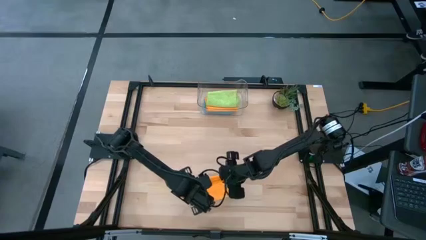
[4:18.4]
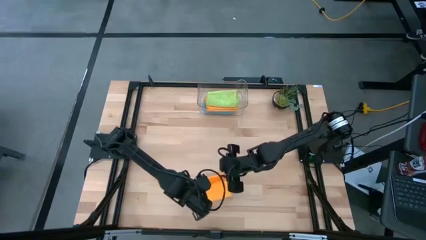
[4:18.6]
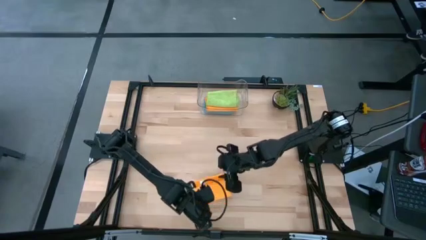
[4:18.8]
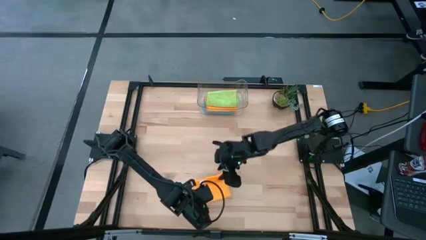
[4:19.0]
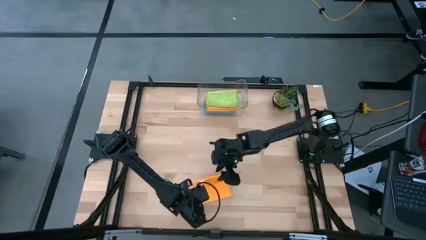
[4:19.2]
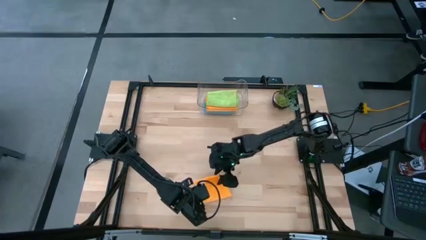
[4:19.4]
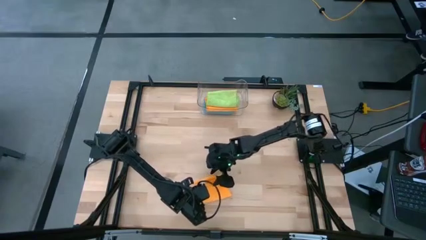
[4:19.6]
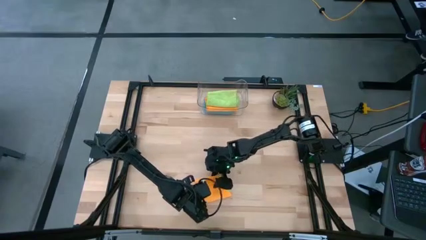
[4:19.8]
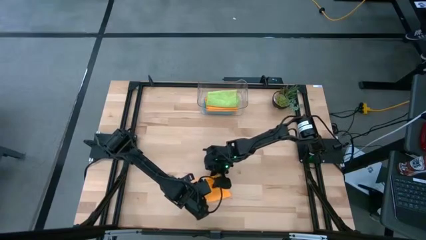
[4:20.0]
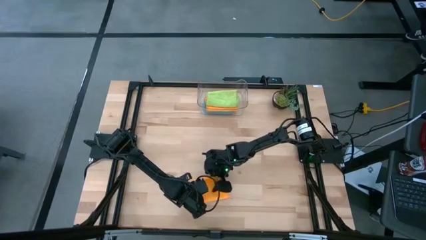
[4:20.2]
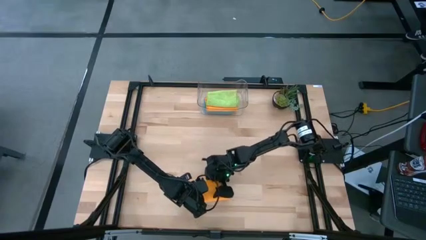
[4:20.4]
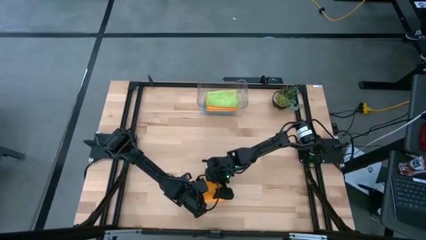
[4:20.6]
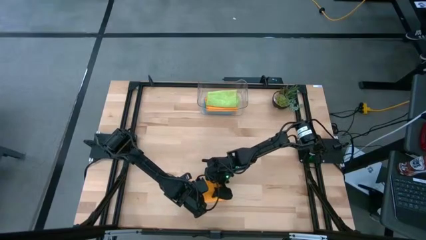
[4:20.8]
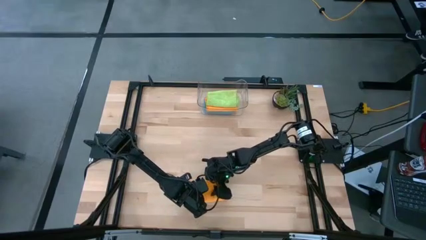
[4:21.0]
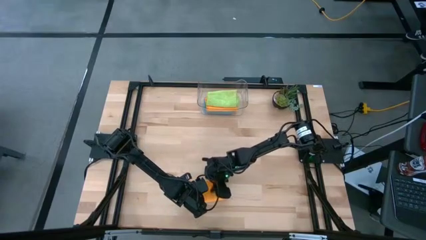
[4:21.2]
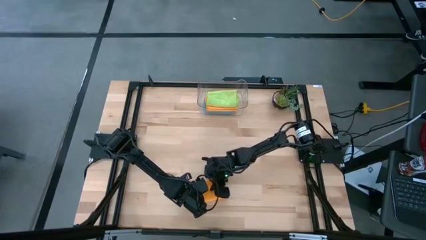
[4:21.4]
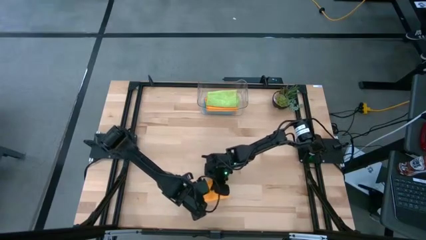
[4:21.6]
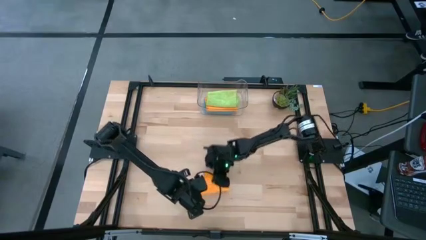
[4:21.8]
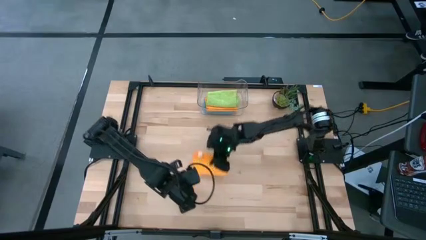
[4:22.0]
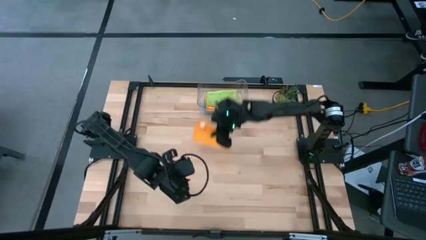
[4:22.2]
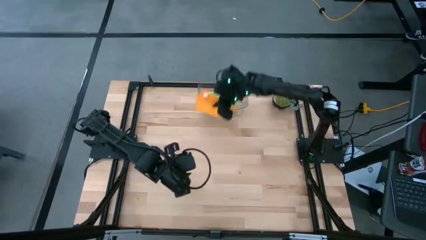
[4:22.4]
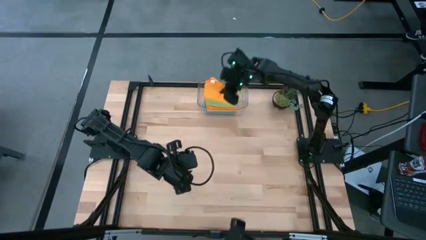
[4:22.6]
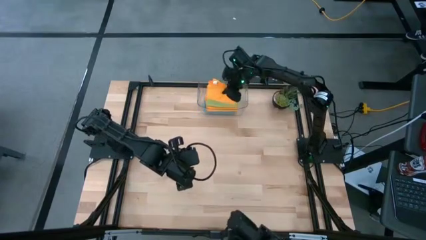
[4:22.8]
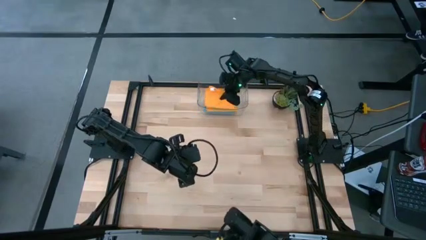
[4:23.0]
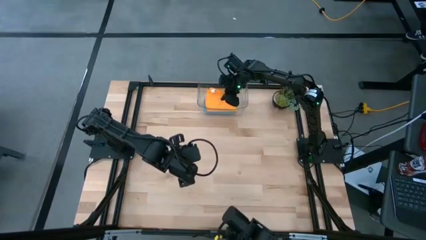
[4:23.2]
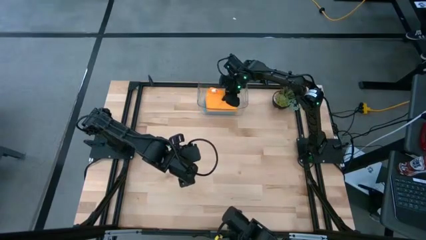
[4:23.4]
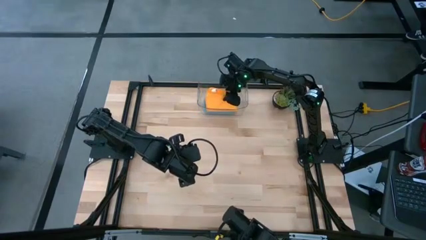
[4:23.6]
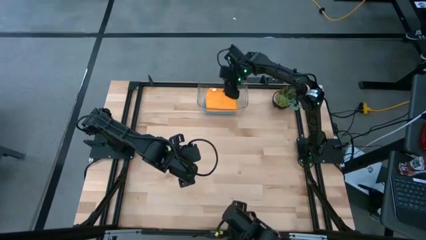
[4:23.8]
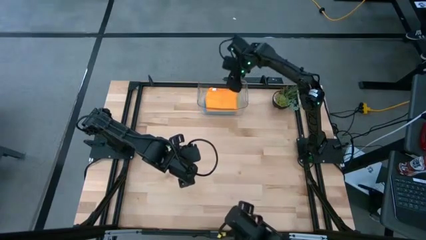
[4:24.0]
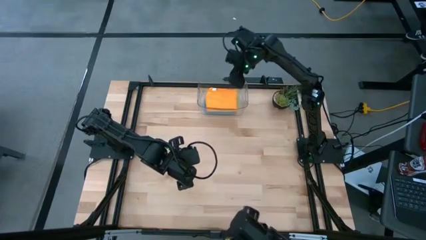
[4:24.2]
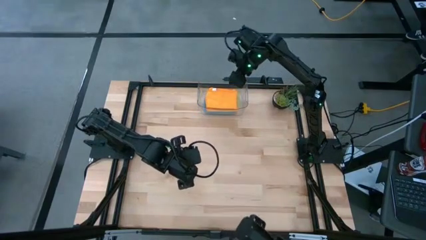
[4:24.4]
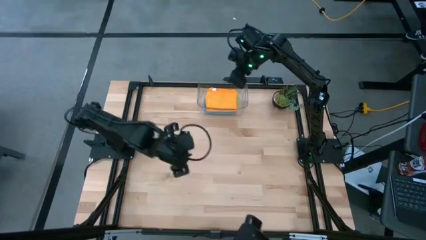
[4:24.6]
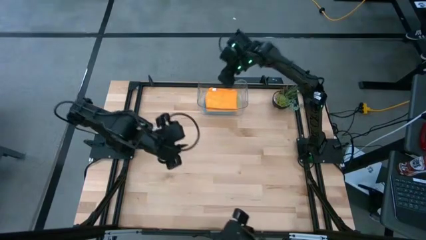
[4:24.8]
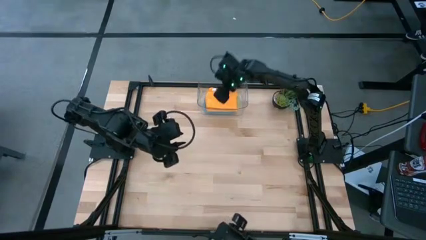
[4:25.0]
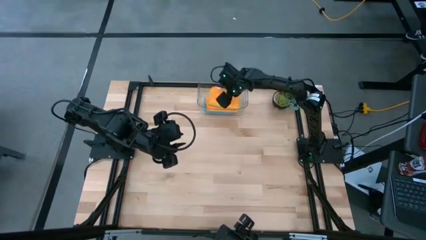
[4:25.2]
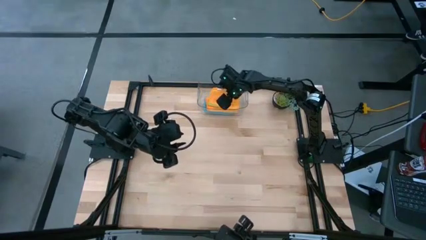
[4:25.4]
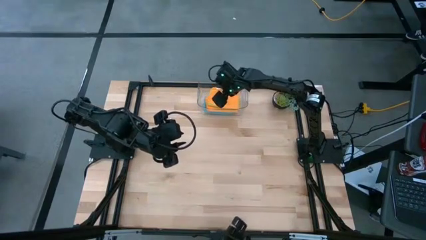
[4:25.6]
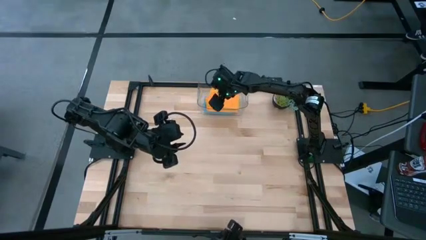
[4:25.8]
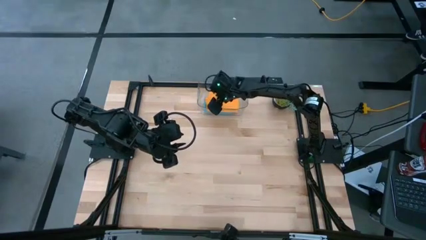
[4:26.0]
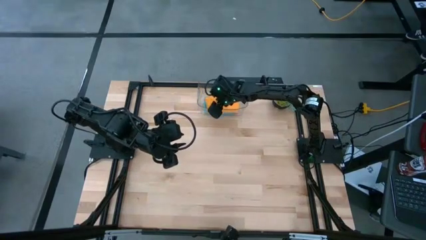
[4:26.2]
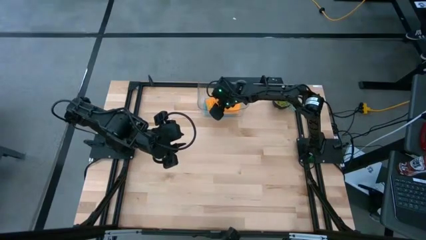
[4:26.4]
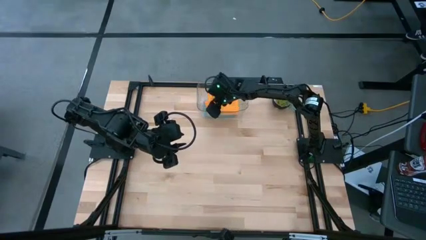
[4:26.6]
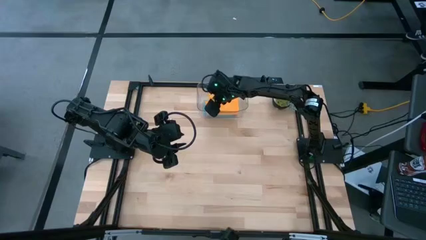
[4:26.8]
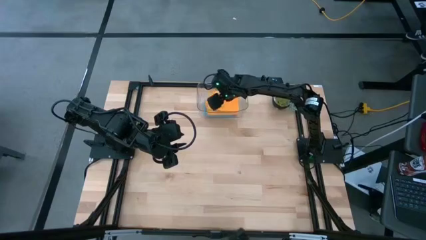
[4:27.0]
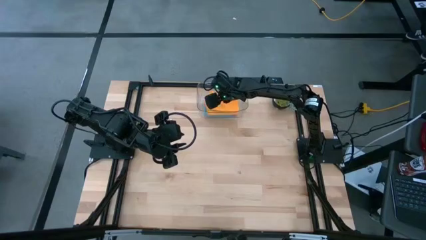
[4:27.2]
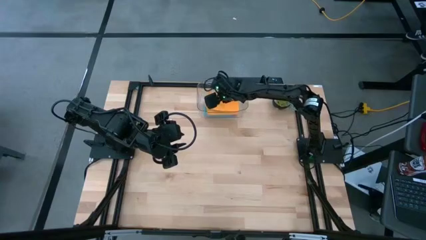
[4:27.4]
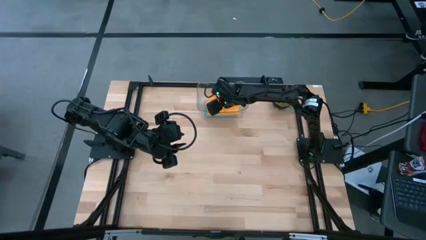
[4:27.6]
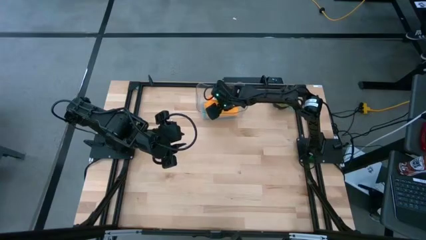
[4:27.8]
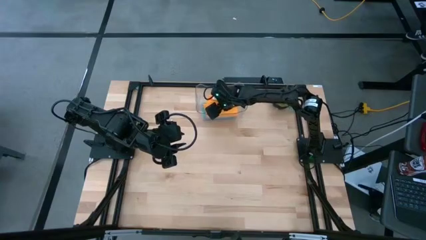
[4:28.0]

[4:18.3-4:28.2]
Task: Fold microfiber towels
Put the orange microfiber cloth into the transparent bin

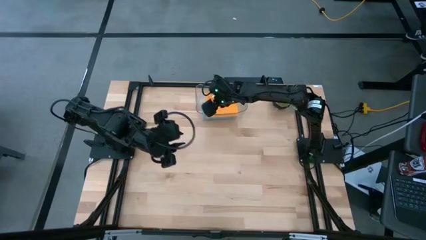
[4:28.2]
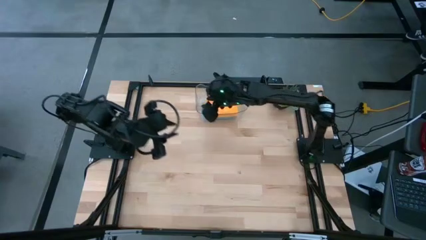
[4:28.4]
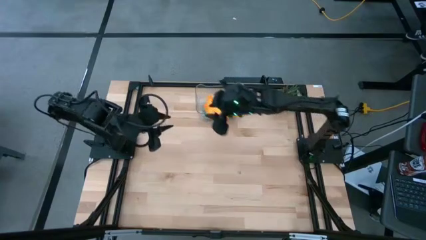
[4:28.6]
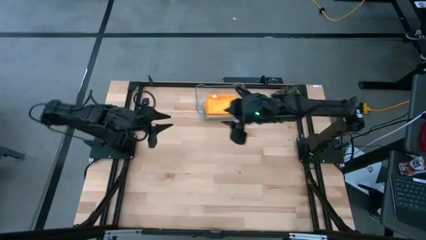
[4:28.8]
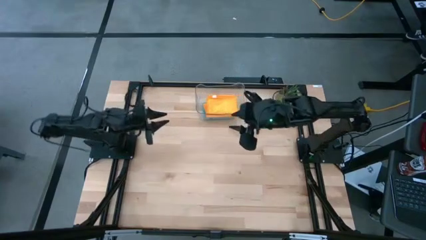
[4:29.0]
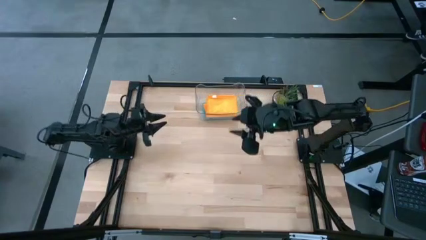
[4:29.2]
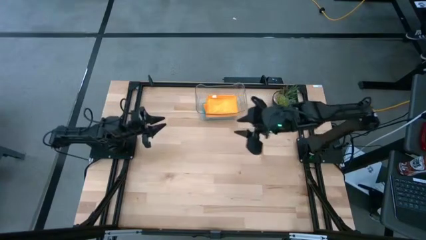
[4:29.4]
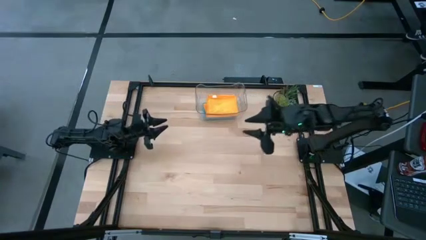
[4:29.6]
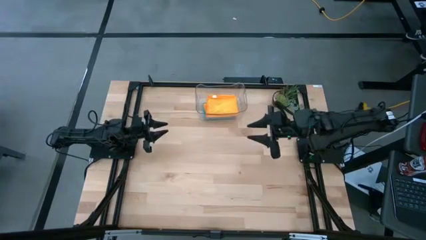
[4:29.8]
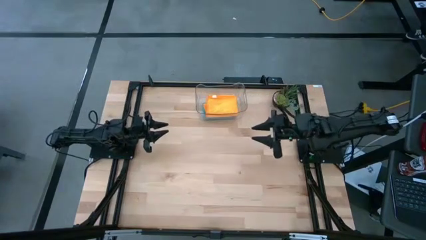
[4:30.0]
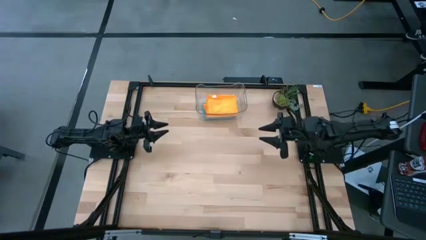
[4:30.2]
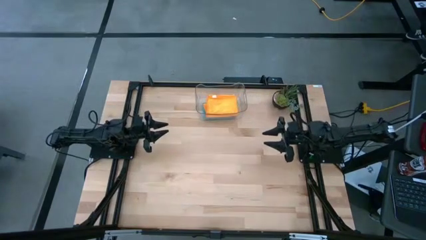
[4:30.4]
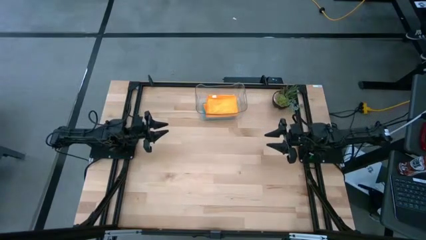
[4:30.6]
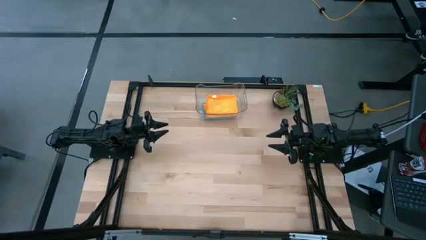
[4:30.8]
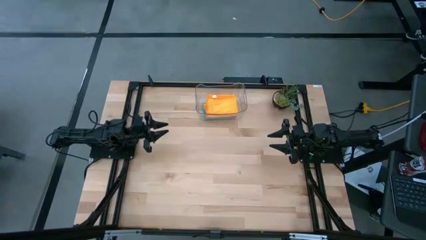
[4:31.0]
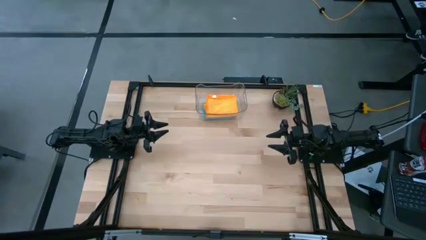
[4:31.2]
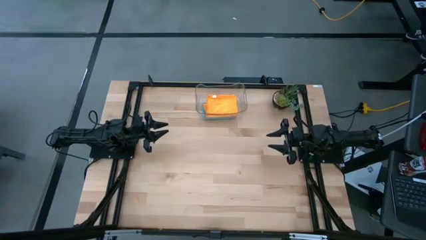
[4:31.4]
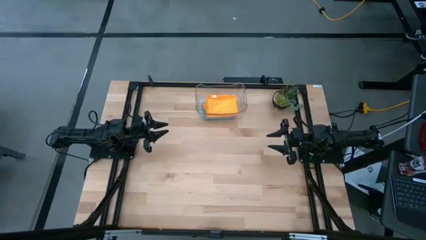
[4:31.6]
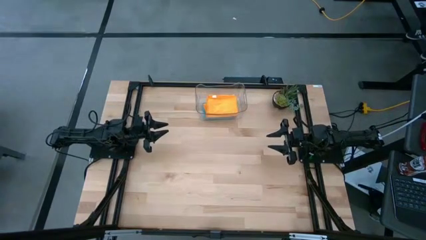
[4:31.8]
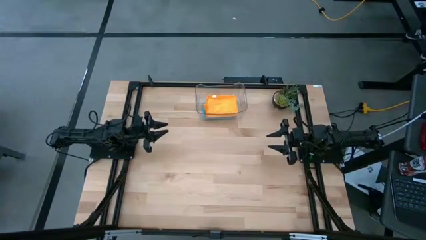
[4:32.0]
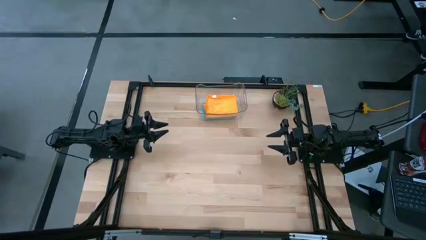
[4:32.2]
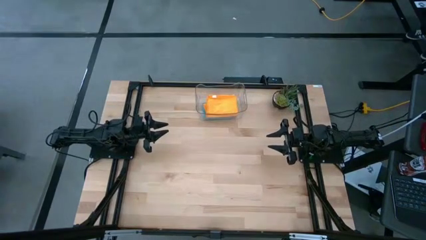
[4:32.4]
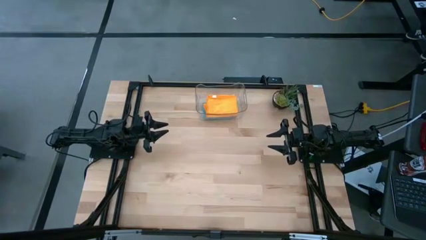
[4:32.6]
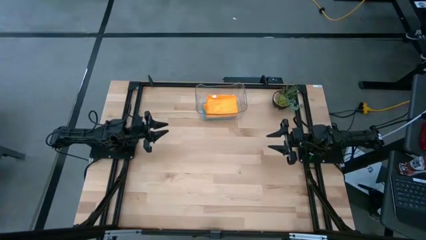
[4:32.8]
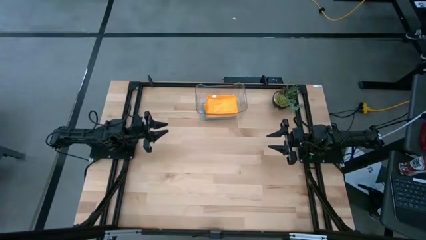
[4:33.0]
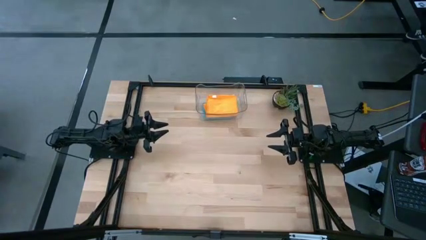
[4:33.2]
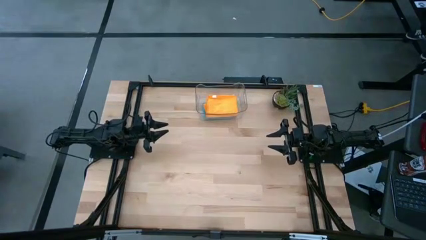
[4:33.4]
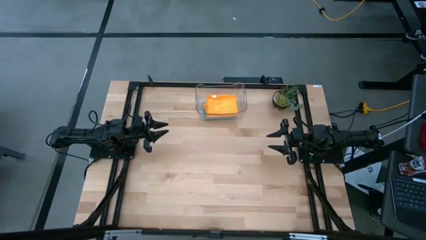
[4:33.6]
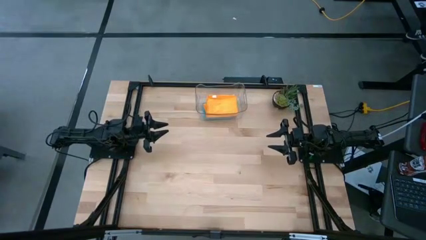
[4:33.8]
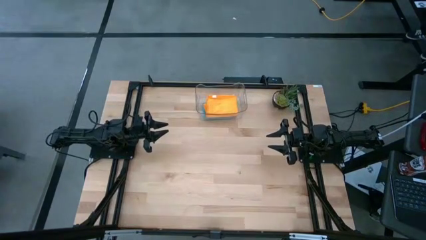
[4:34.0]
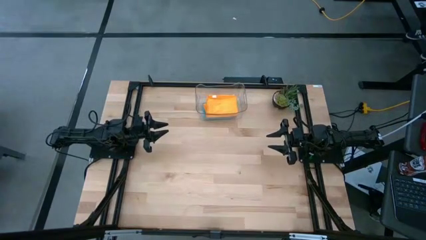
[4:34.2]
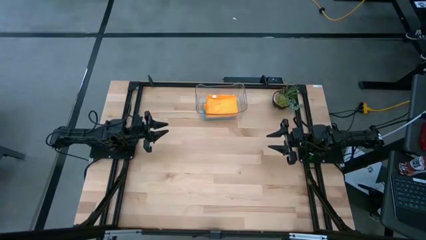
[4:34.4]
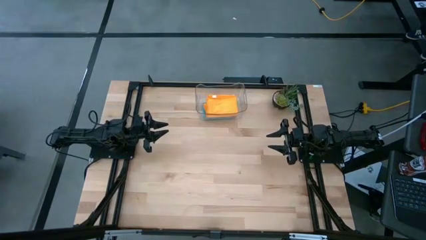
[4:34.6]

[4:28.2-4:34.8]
Return to Home Position
